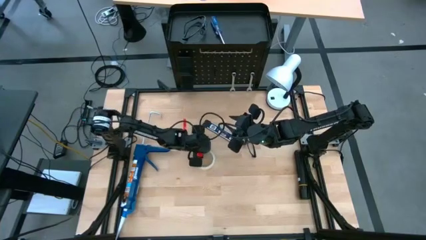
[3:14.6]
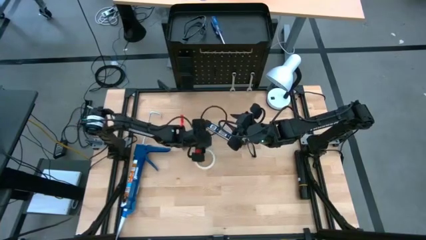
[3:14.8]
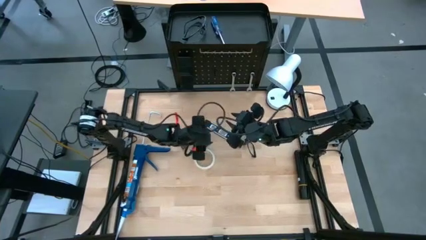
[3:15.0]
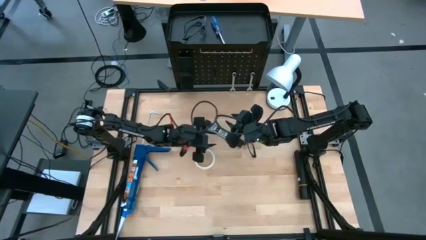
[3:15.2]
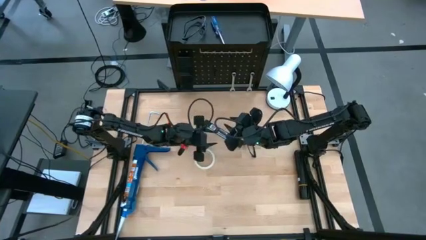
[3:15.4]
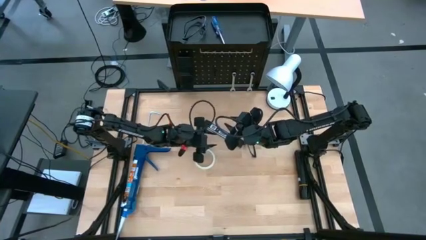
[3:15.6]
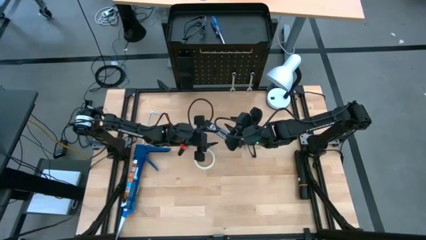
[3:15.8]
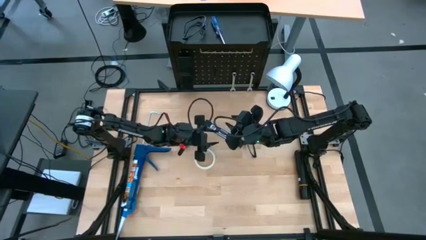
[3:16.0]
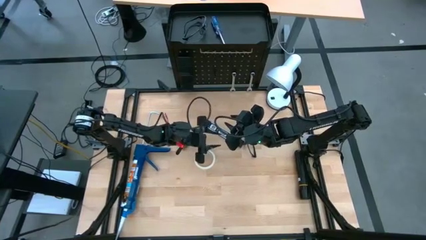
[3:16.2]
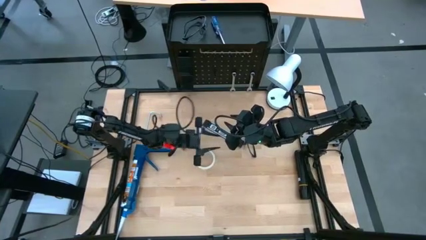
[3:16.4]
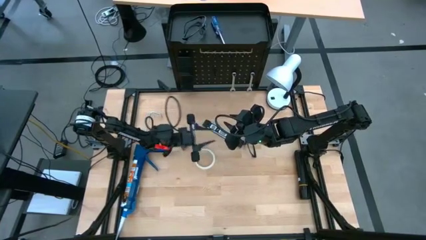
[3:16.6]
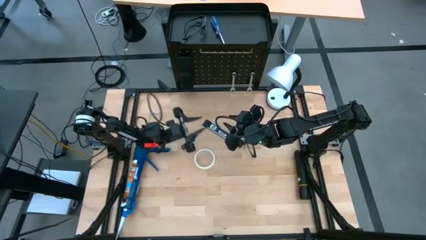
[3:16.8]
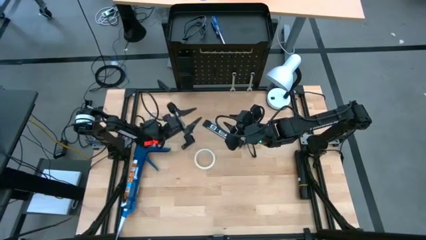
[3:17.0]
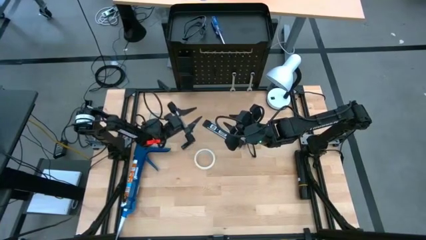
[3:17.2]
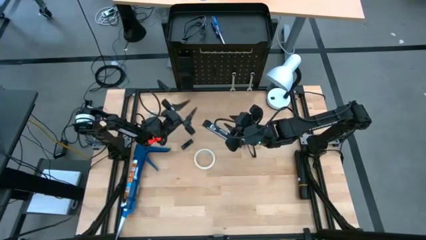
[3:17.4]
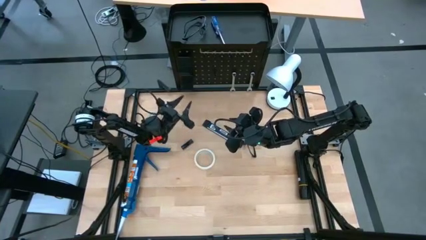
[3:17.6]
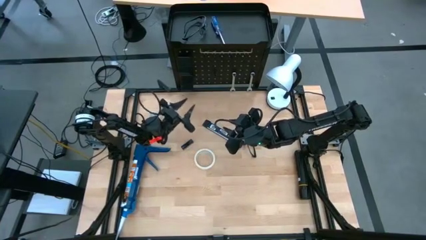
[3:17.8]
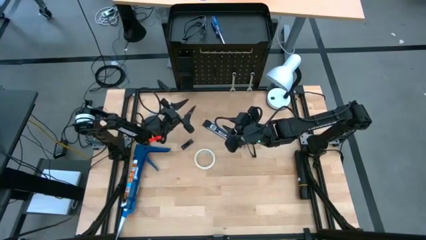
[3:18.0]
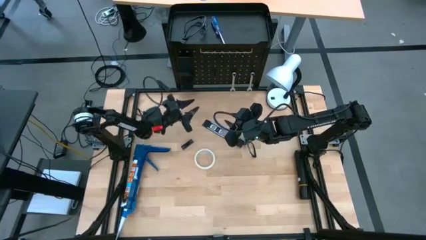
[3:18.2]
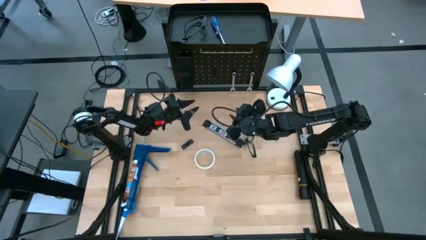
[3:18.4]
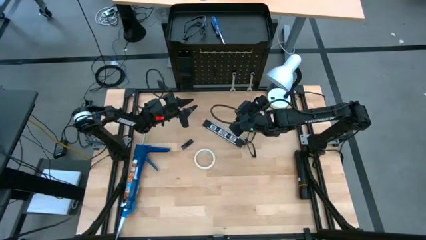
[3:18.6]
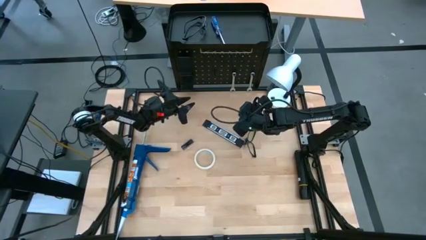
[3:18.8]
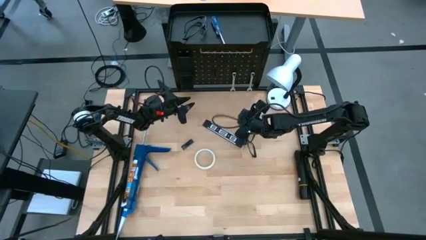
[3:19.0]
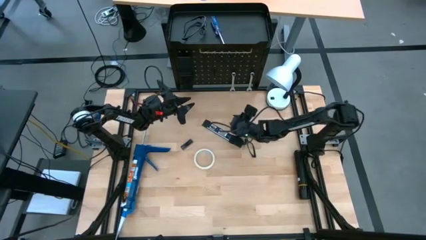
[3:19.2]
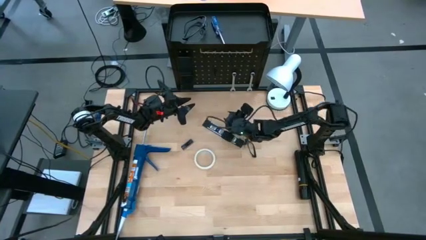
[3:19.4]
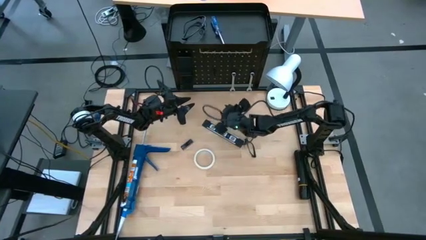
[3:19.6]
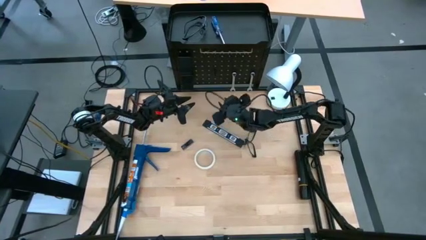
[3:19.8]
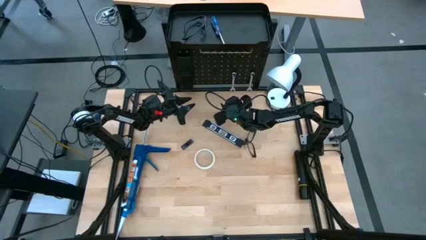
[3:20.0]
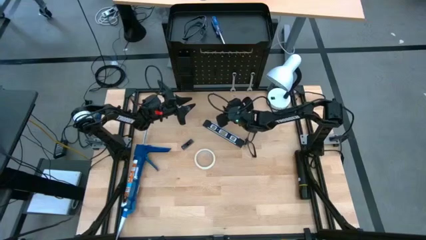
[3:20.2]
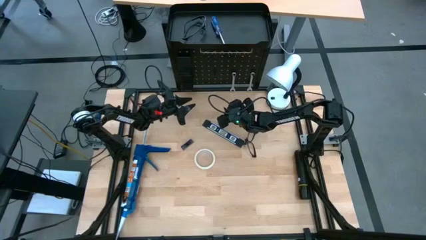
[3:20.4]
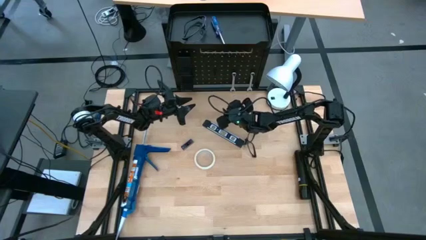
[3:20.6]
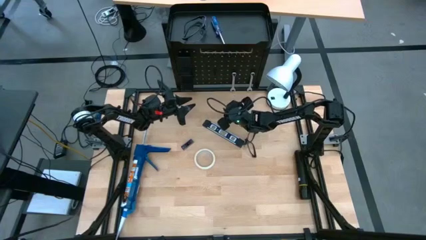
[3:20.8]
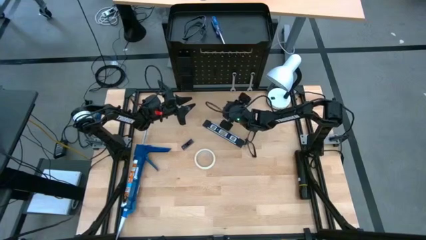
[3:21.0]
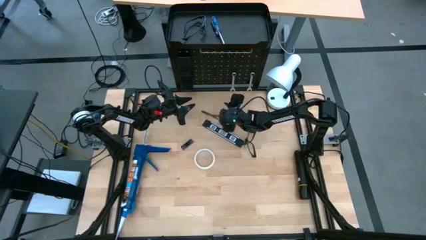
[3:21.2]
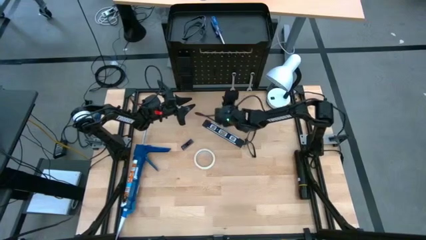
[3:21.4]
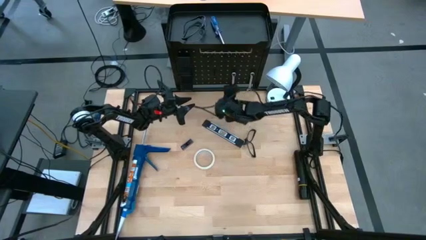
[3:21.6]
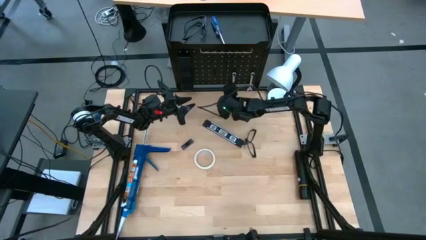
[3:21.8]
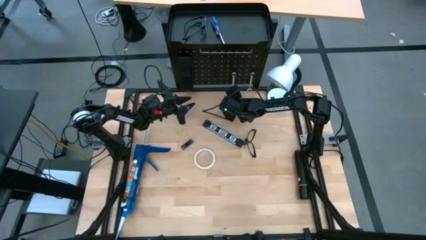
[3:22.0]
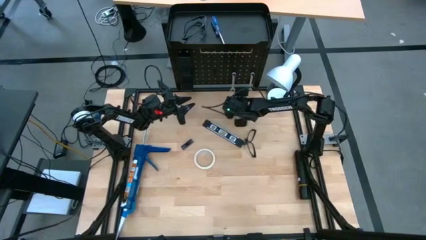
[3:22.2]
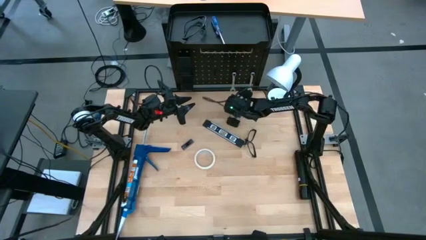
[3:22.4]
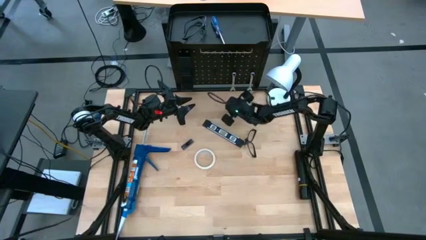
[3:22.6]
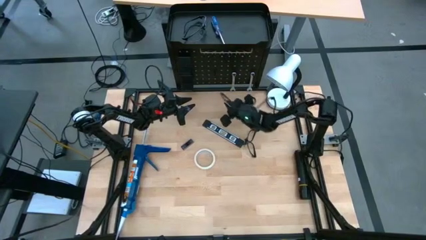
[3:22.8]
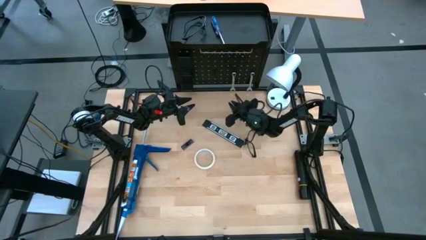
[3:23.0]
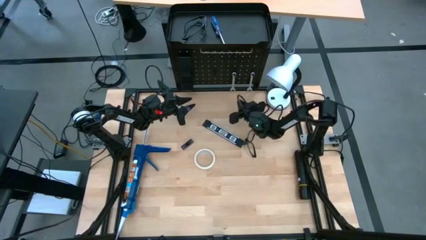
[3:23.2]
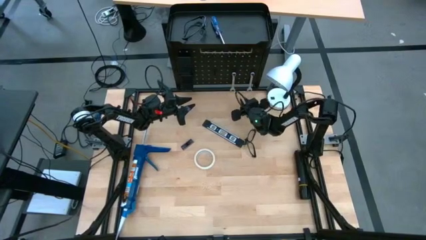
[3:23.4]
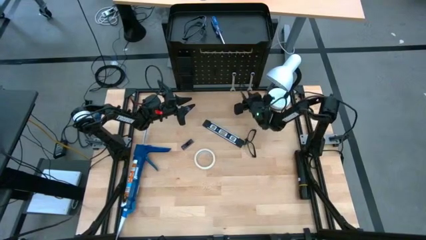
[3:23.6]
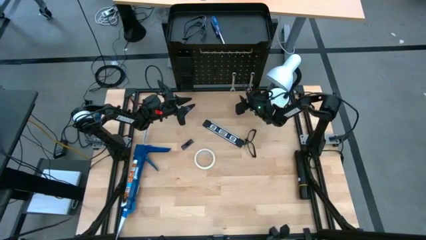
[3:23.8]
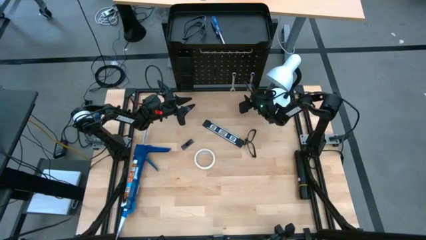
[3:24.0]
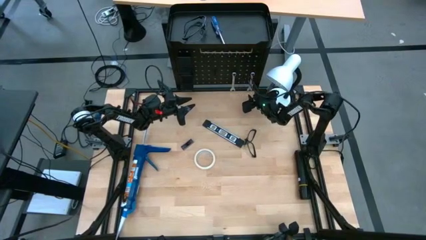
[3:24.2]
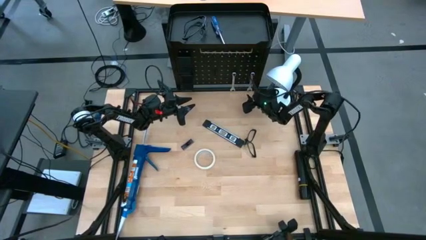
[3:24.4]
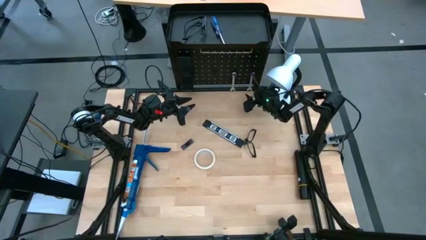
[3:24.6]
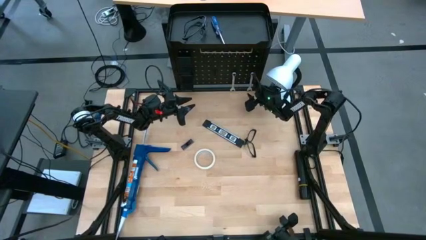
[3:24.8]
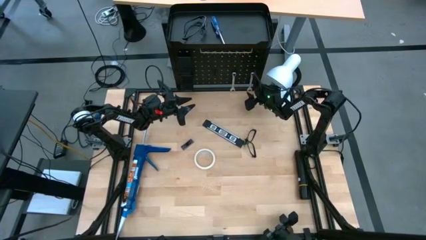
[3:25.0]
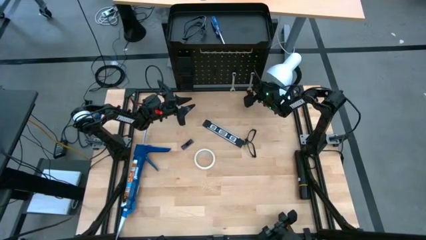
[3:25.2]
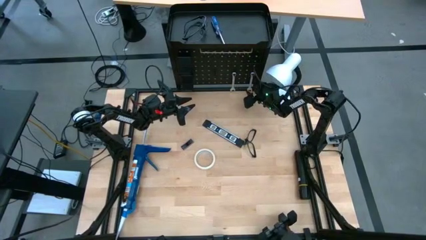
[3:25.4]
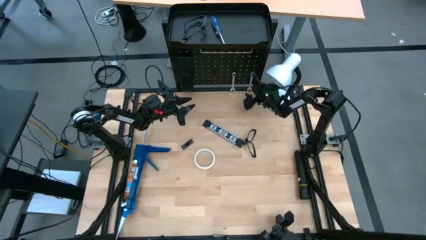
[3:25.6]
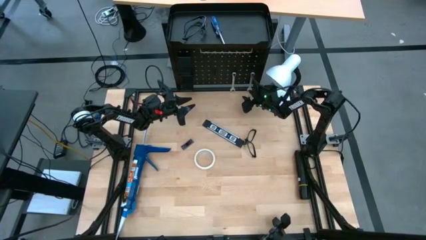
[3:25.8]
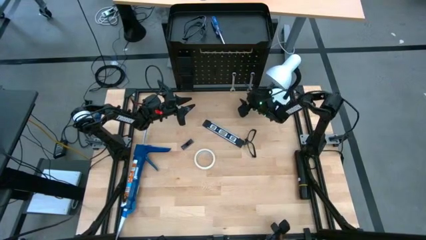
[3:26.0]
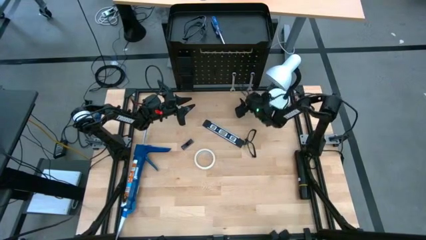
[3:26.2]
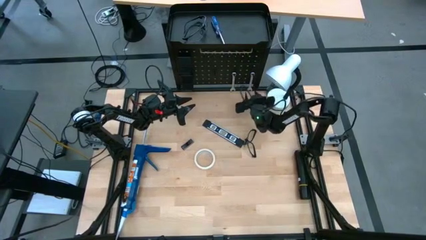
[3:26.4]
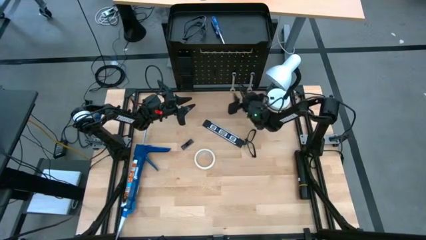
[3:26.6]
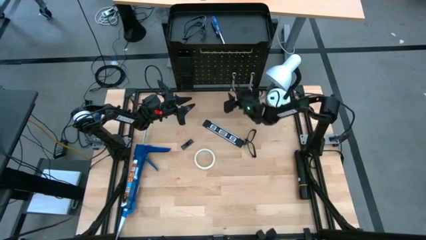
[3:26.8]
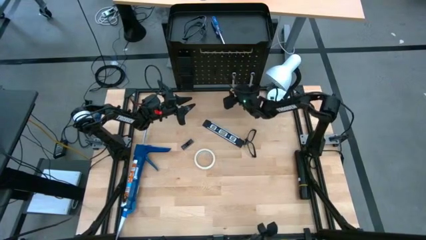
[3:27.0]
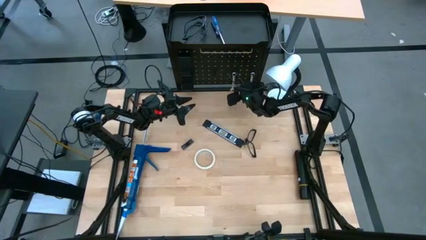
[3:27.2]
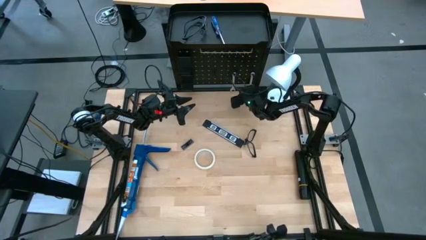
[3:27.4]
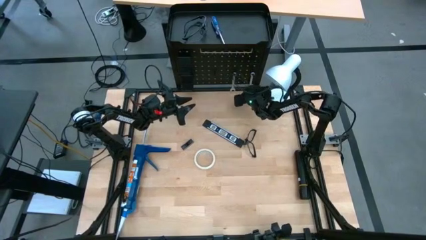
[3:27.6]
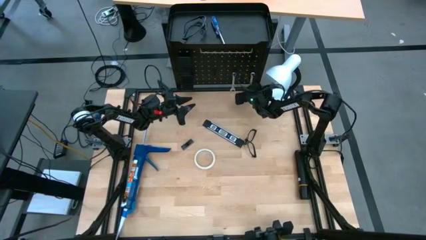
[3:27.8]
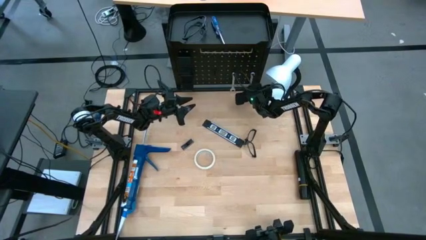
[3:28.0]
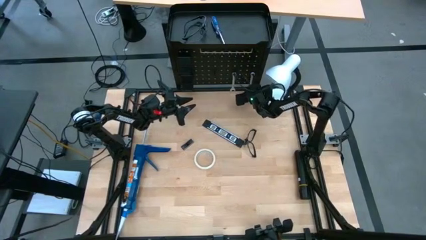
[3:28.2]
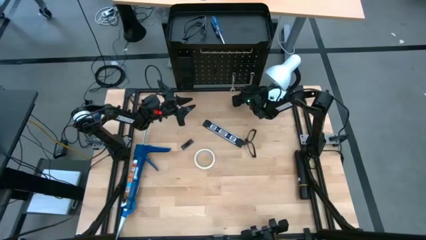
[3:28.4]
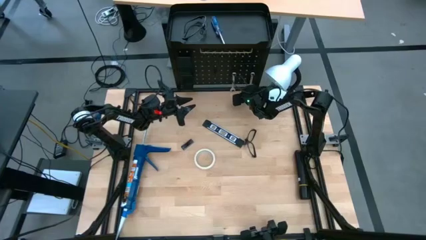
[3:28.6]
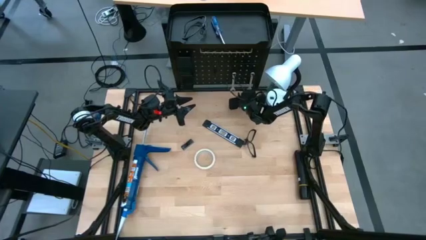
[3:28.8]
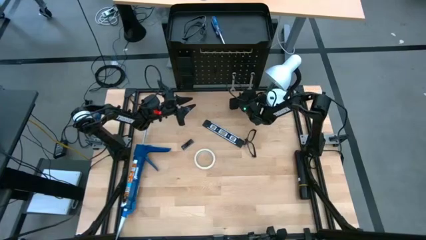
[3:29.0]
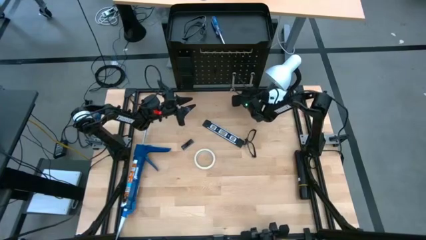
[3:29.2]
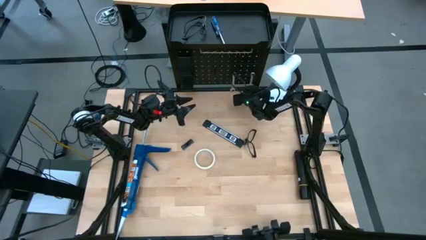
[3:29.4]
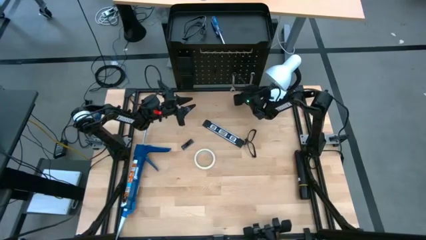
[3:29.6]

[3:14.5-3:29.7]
Task: Hang tools onto peg board
Unhang the right wrench from the peg board
